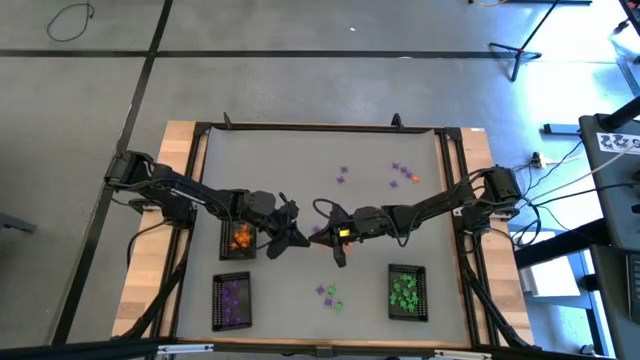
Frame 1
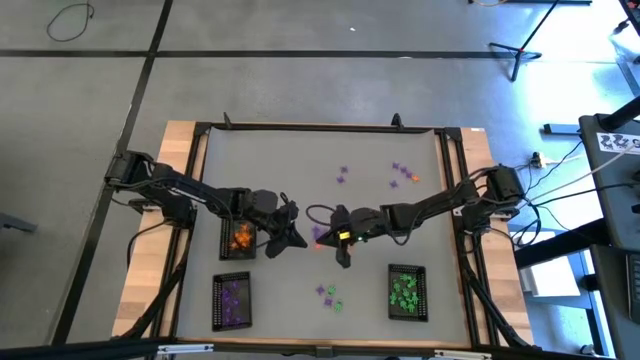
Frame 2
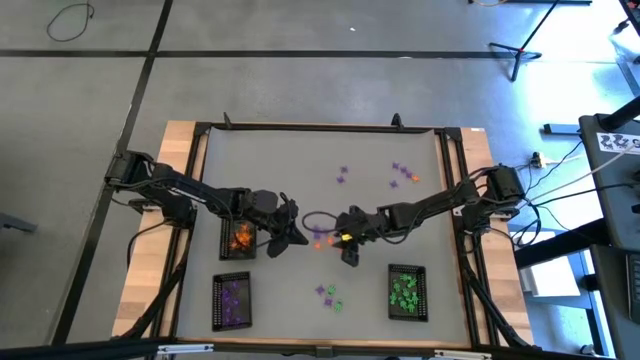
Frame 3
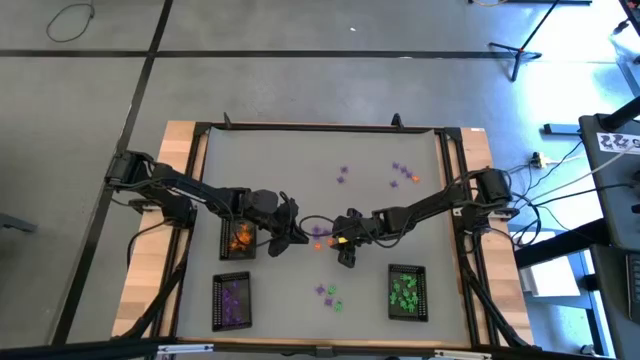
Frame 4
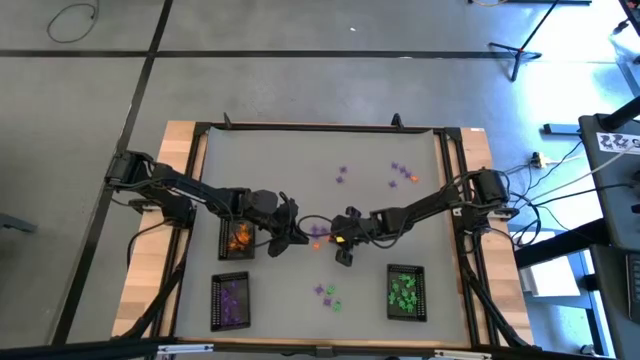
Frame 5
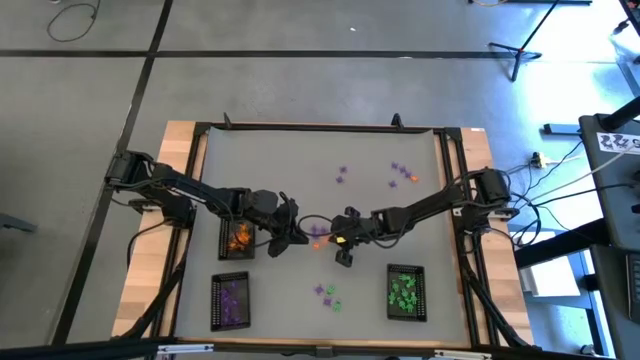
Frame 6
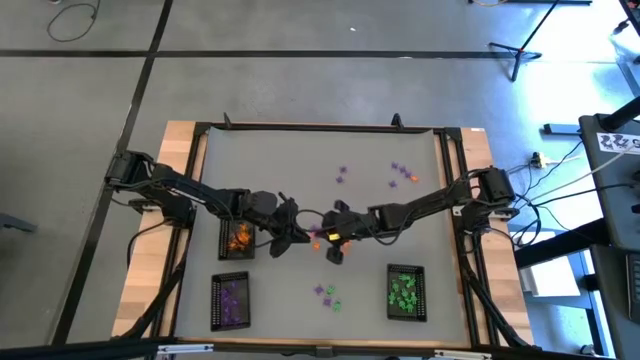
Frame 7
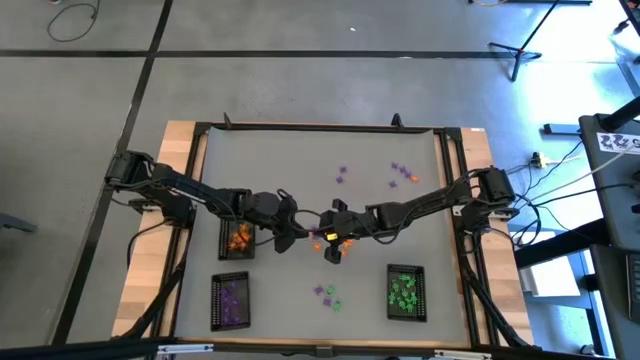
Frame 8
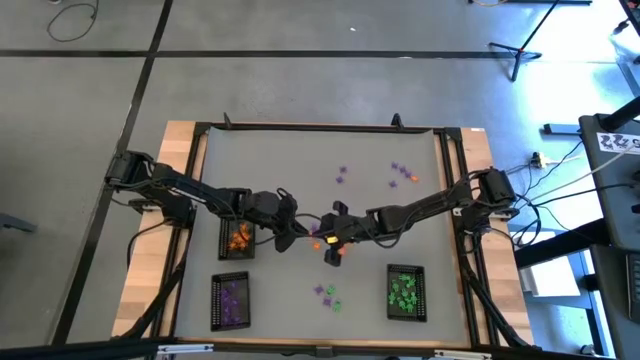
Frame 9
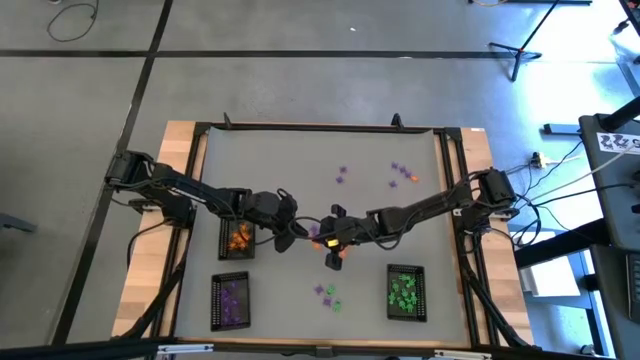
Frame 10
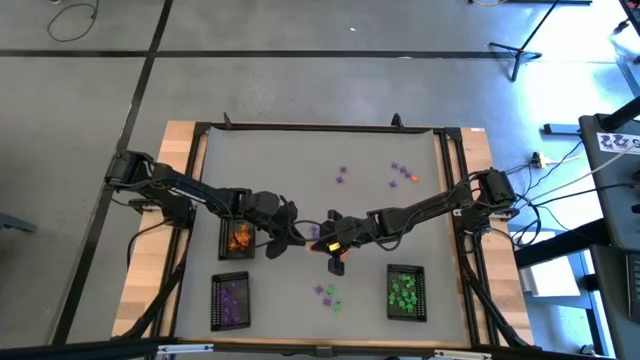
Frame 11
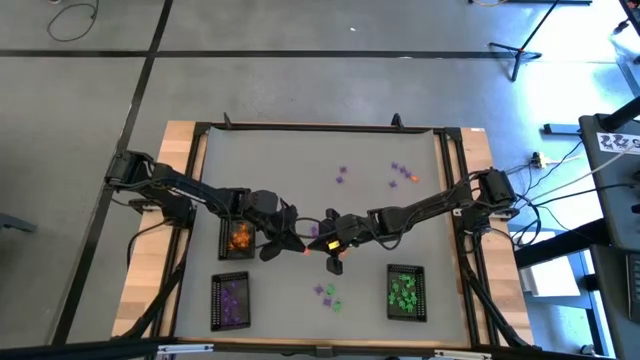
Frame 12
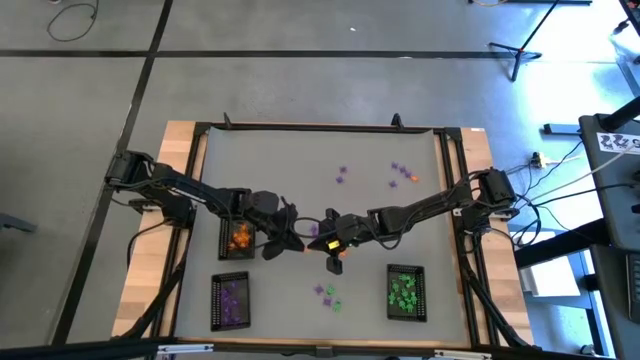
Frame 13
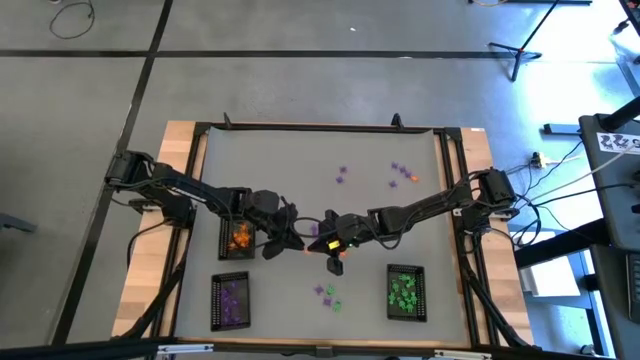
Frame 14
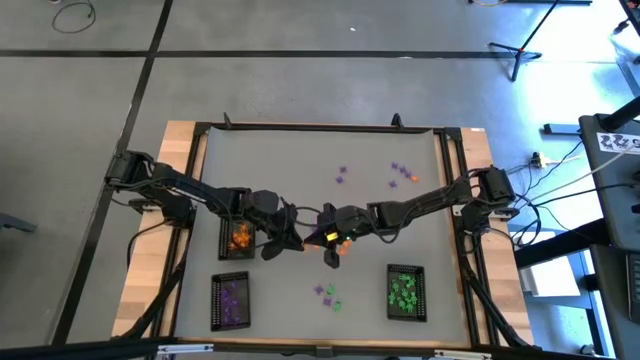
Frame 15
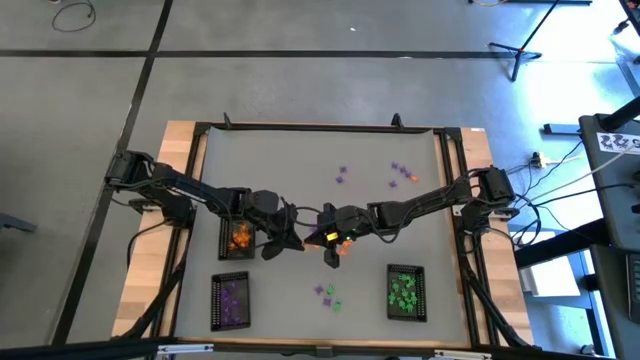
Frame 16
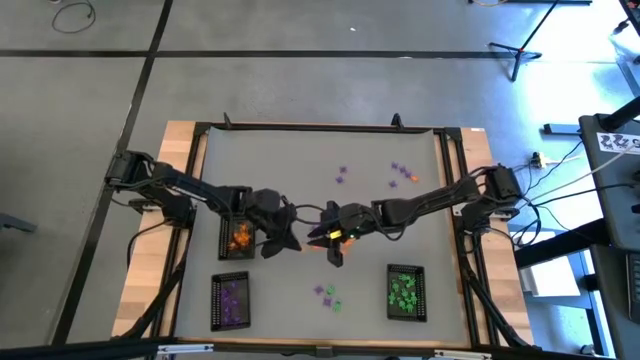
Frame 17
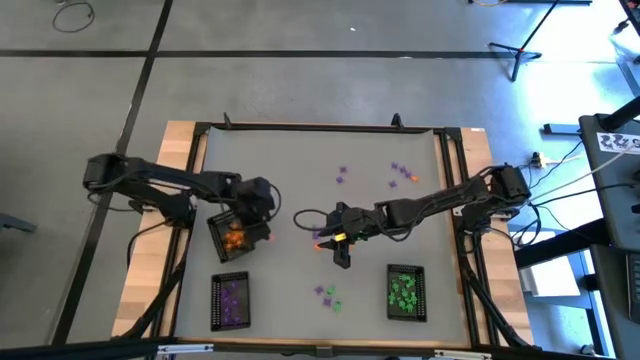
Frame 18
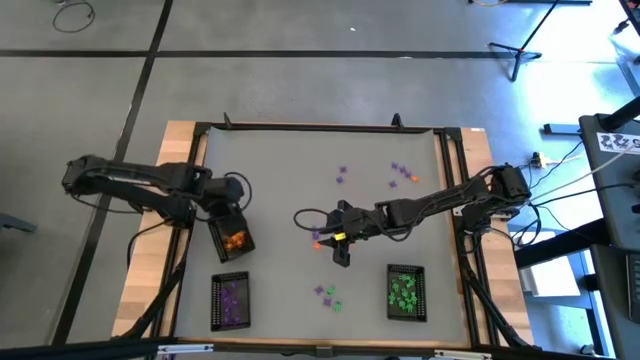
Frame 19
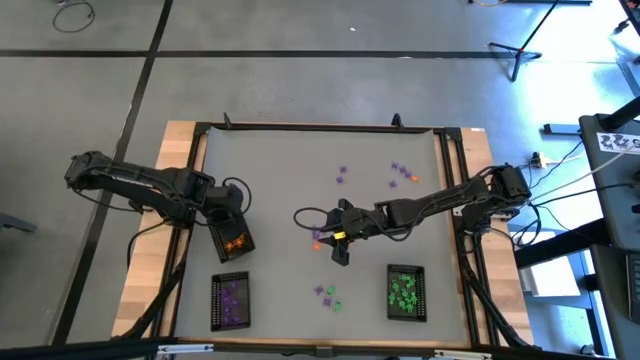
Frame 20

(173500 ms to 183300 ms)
Task: Sort Halloween decoration
Put the orange spider toy into the top black basket

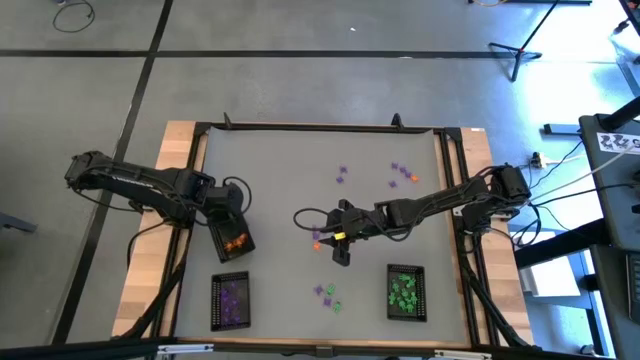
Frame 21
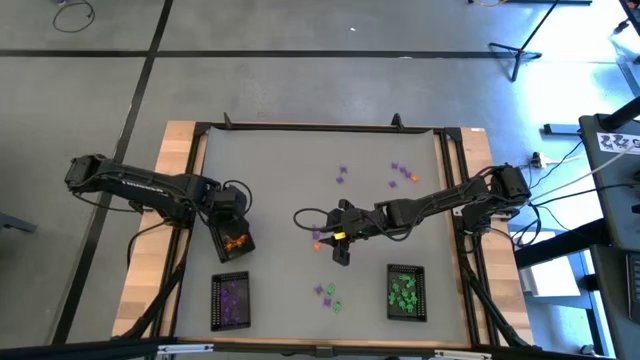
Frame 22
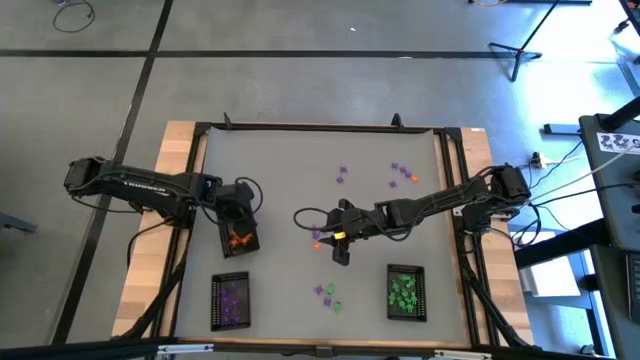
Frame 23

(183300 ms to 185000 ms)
Adjust the top black basket

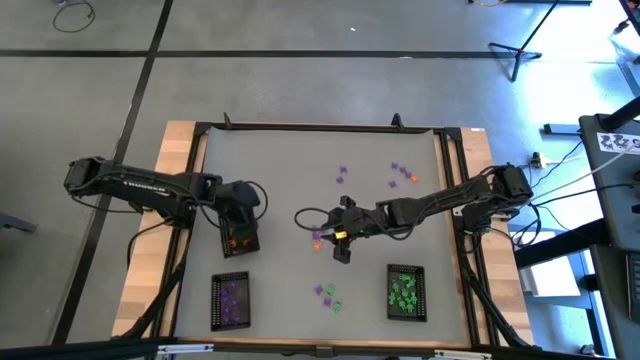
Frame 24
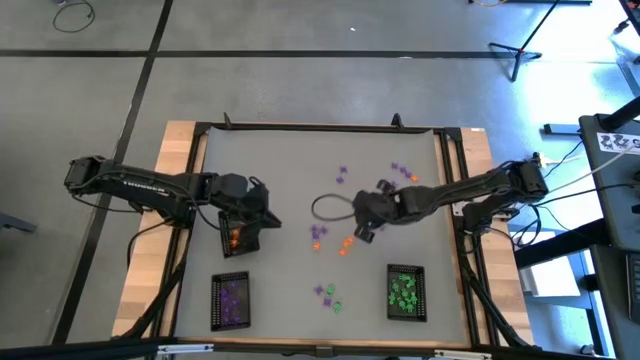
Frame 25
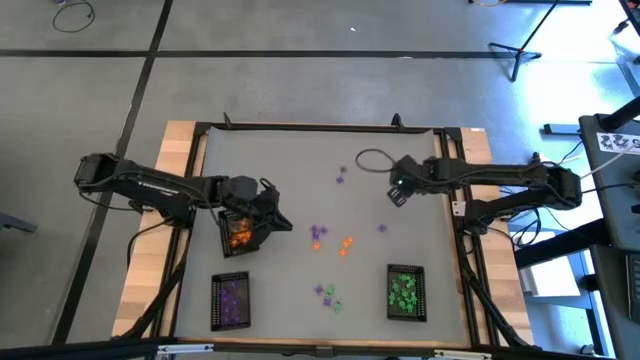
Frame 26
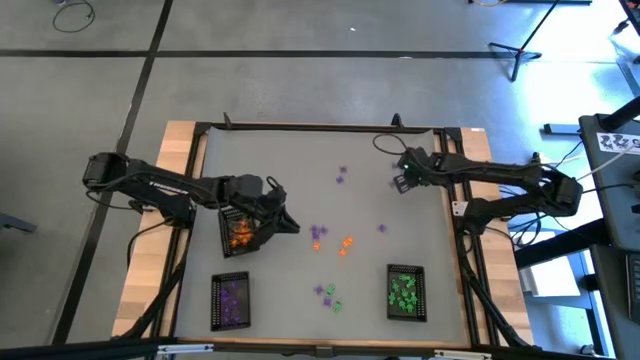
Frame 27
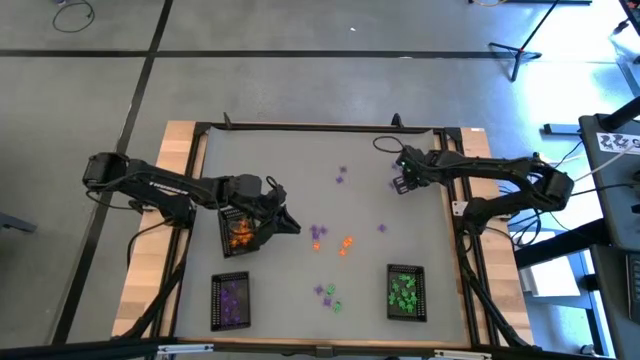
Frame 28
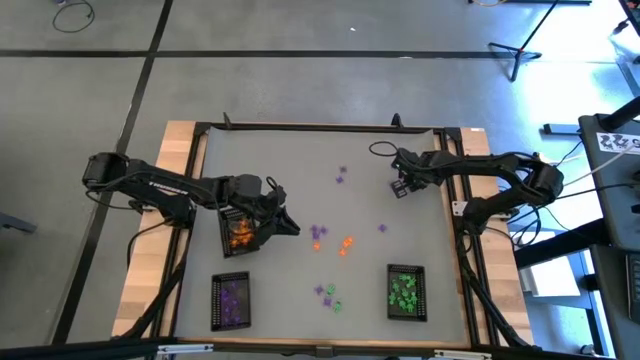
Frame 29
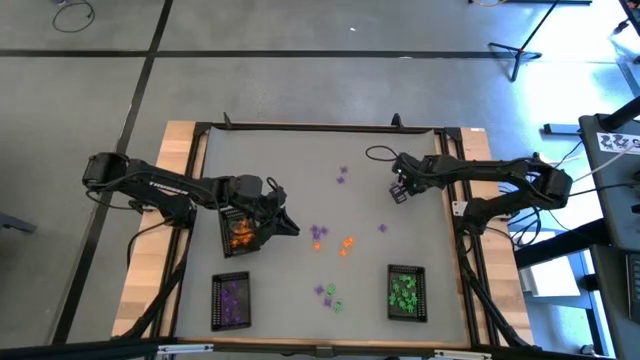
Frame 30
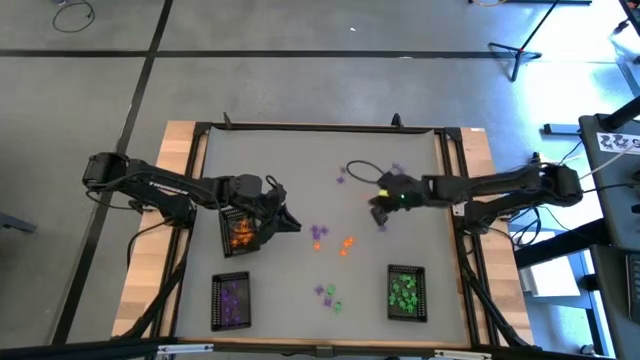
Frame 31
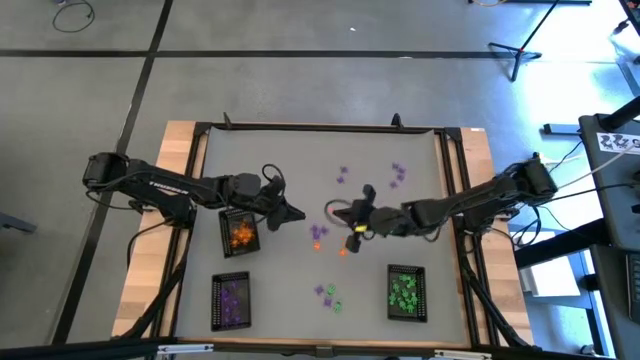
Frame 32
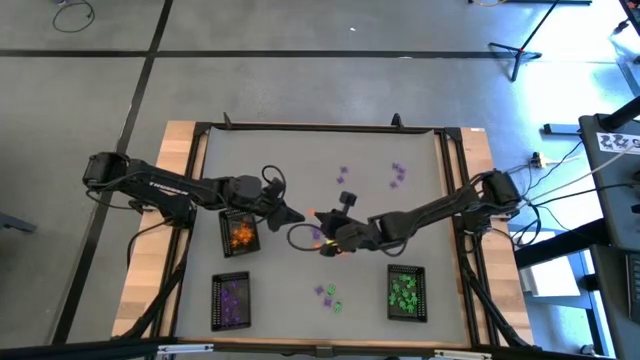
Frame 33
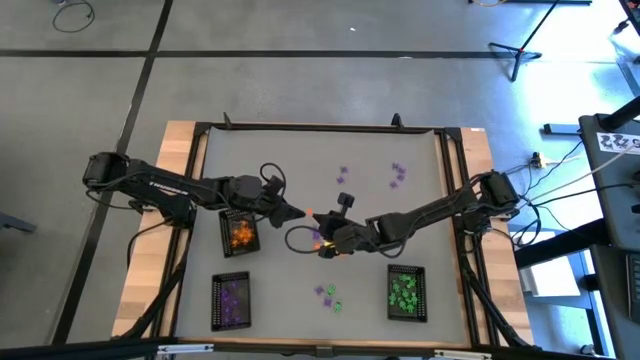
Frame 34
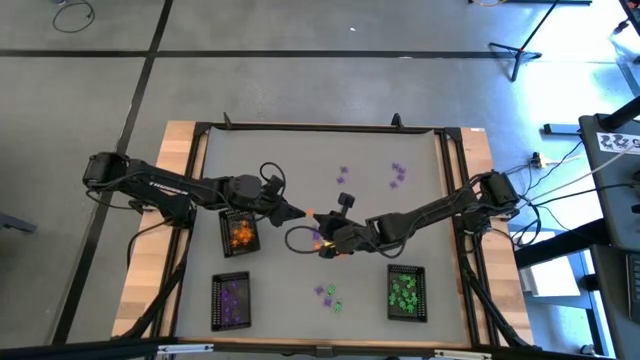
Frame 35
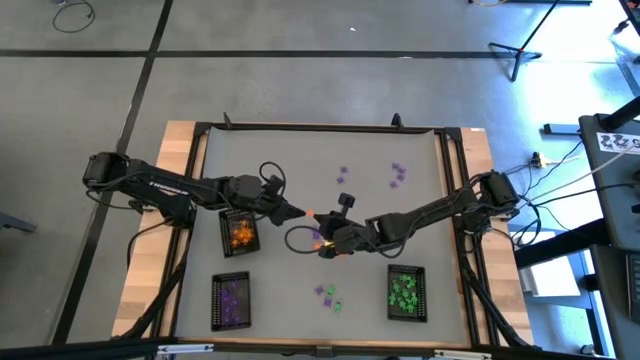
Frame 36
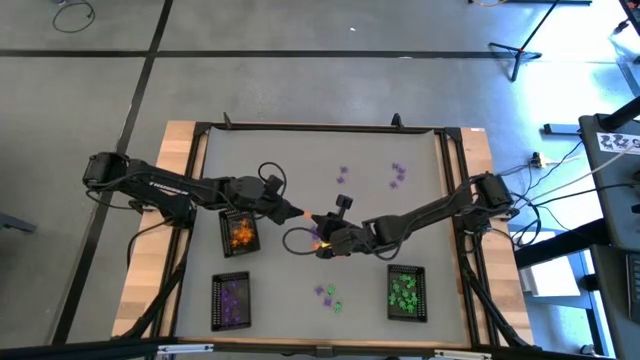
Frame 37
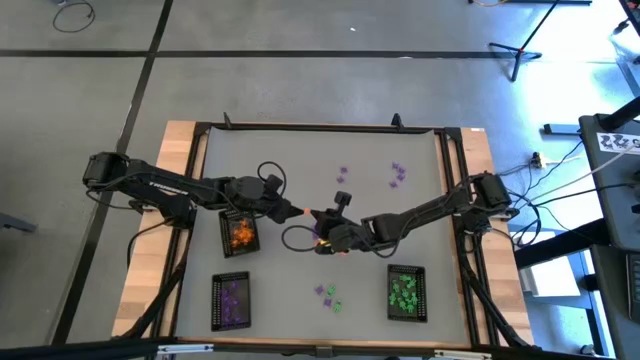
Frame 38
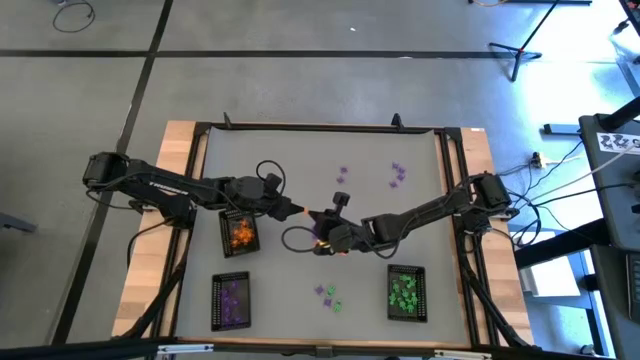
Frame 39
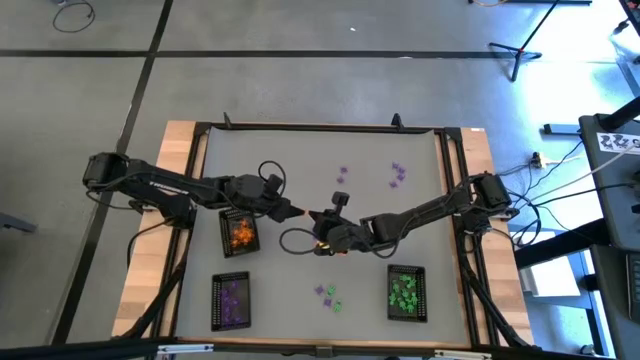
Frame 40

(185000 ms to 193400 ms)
Put the orange spider toy into the top black basket

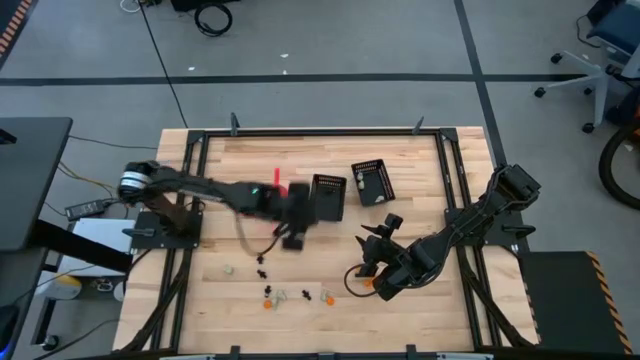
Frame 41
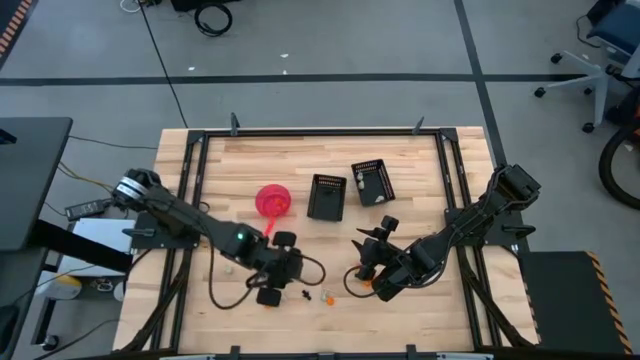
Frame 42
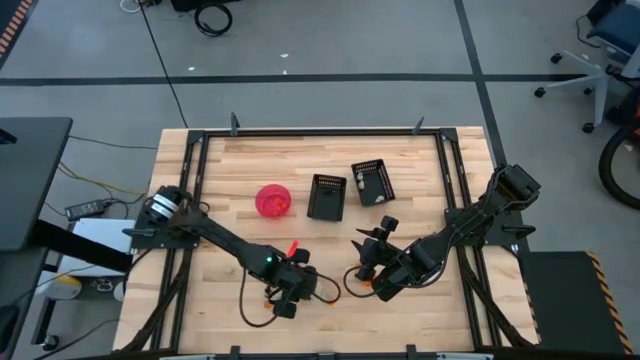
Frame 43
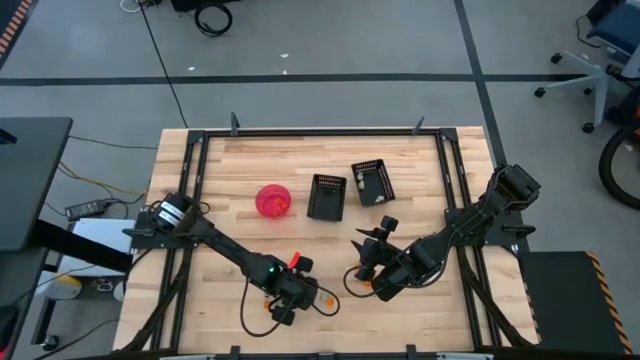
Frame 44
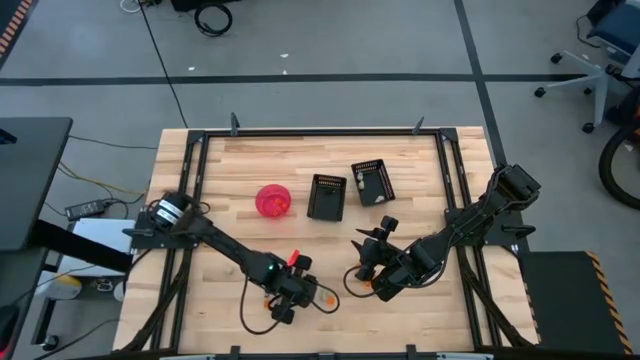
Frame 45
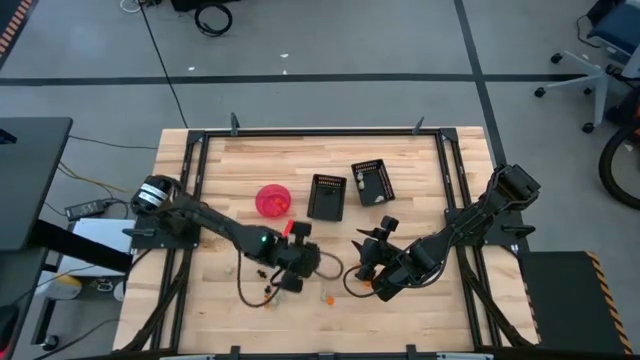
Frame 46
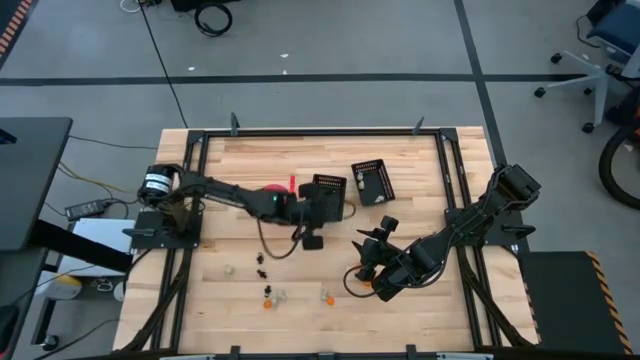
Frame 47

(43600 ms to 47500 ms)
Task: Sort Halloween decoration
Put the black skeleton toy into the left black bin
